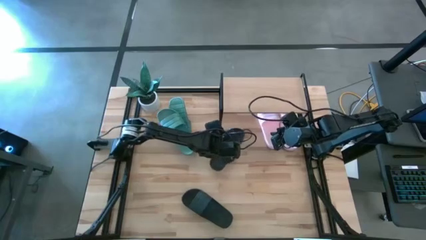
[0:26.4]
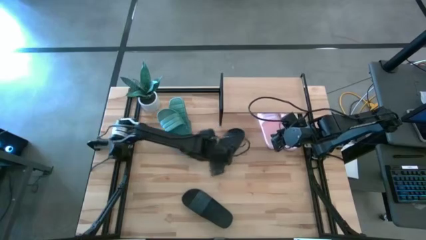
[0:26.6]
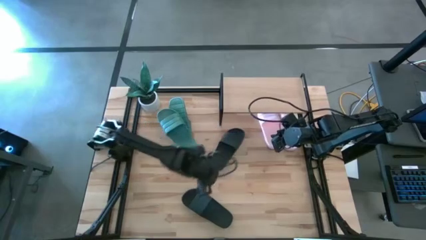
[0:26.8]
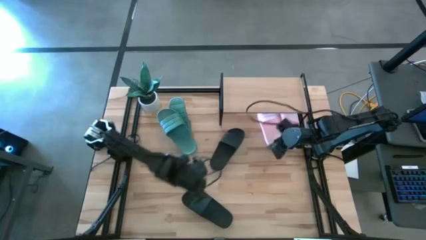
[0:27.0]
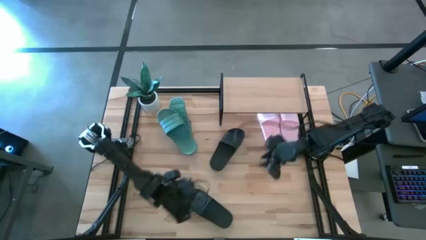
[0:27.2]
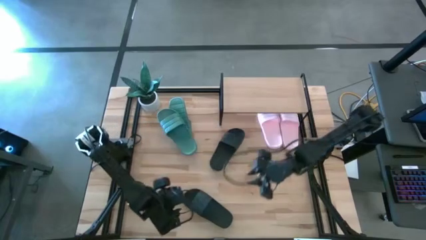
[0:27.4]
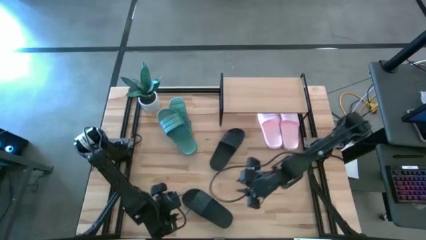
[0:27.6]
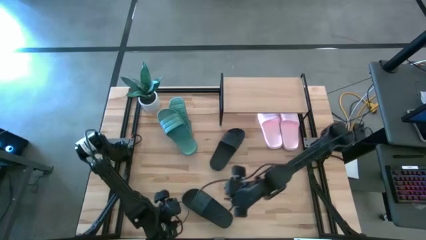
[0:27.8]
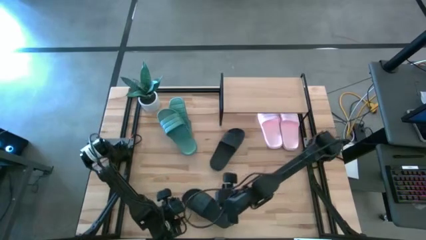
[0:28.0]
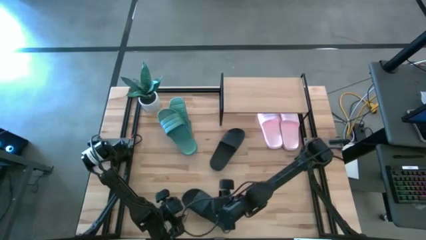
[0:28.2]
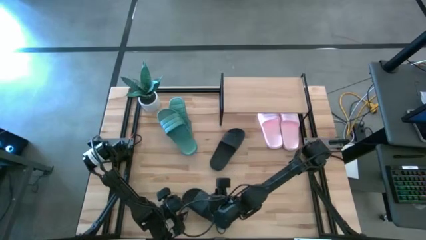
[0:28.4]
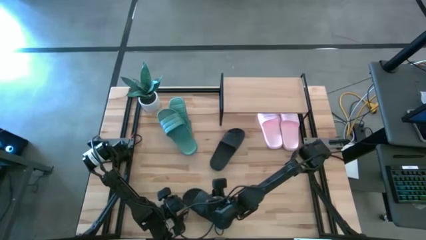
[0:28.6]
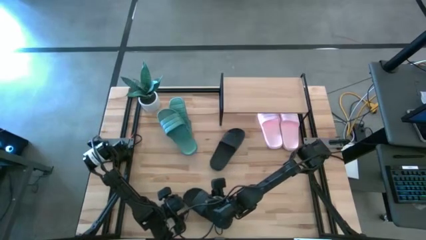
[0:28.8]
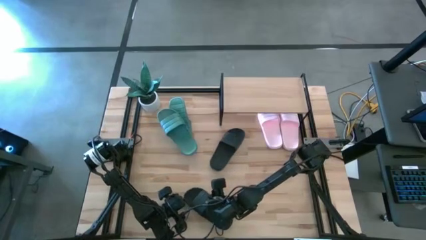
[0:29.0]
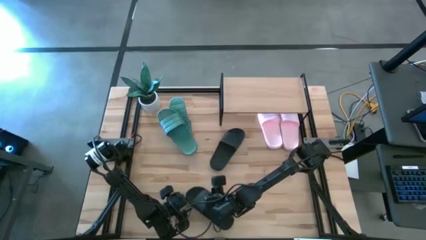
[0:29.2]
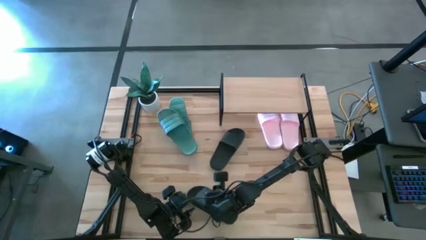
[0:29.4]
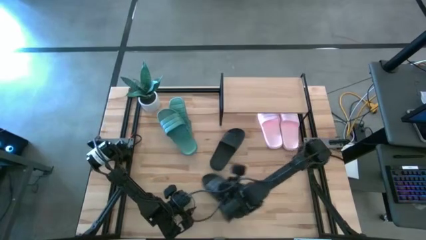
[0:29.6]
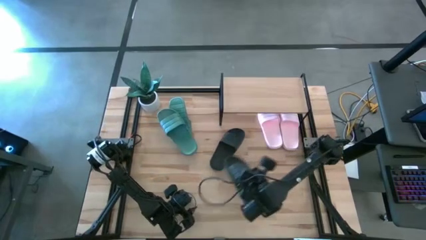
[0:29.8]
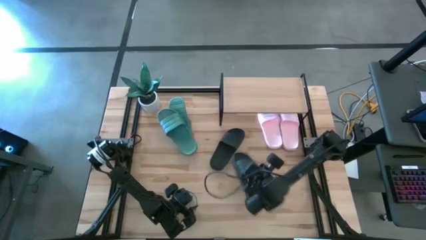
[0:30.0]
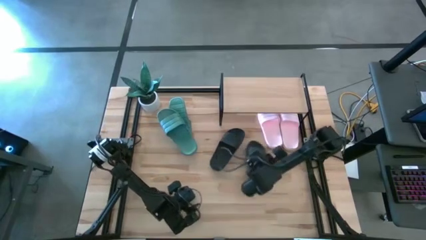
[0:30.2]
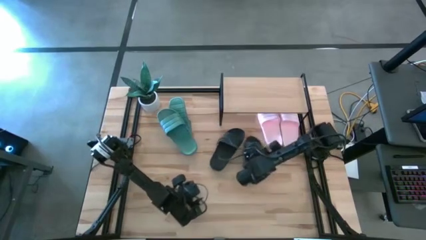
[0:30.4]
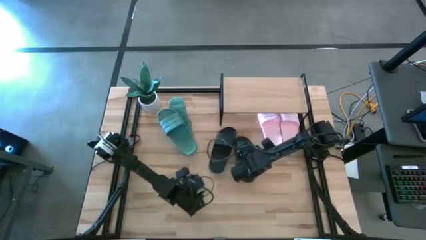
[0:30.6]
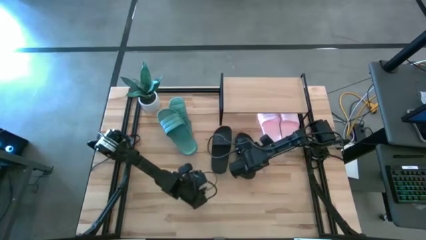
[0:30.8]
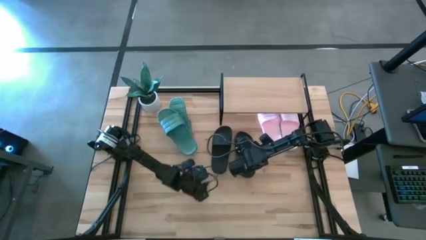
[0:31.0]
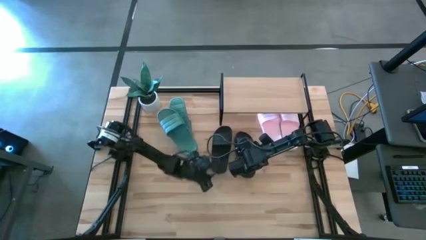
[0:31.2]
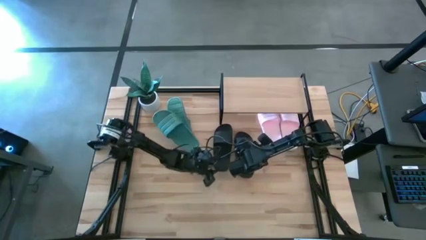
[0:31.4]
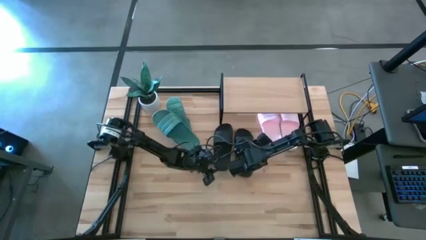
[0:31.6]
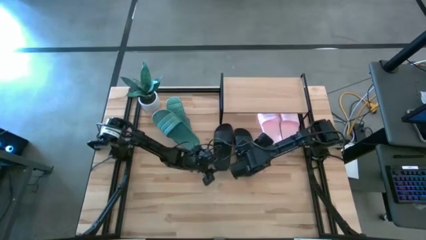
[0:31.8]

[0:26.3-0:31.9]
Task: Pick and place slides into the shelf
Put the black slide under the shelf

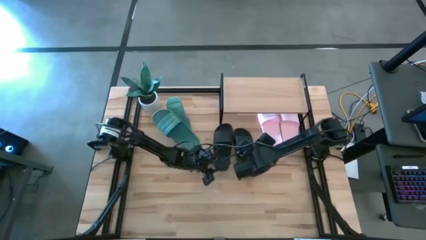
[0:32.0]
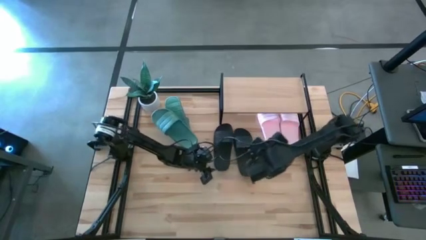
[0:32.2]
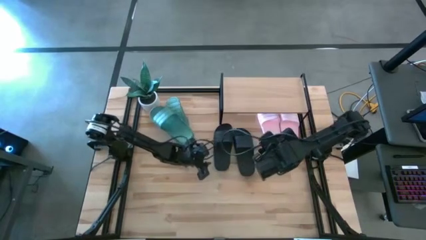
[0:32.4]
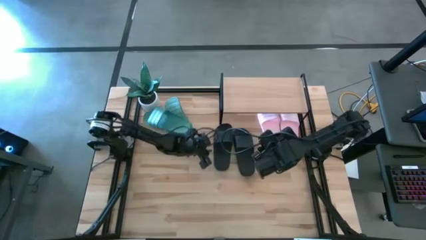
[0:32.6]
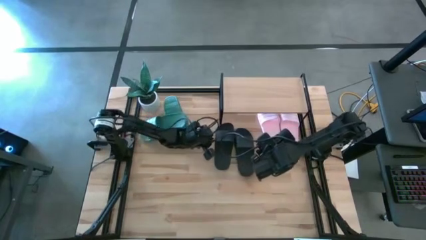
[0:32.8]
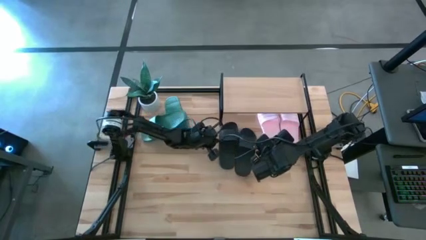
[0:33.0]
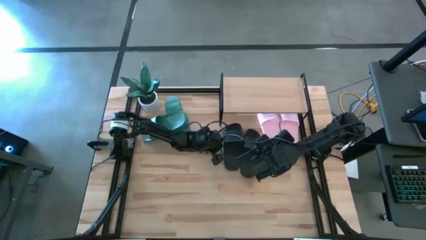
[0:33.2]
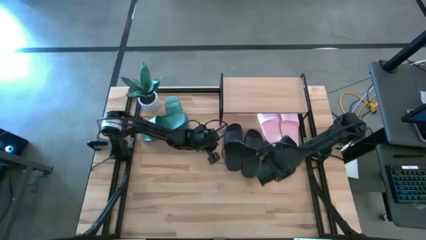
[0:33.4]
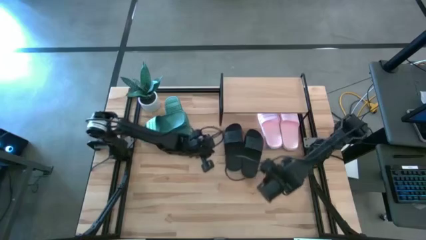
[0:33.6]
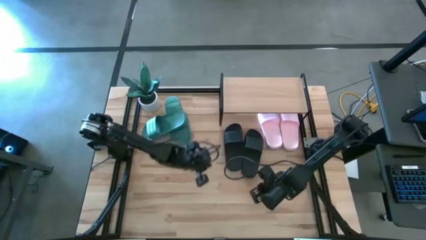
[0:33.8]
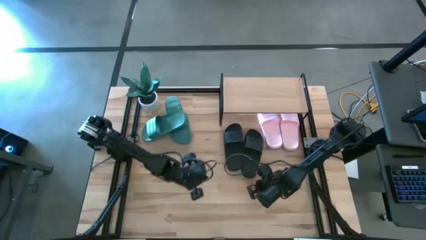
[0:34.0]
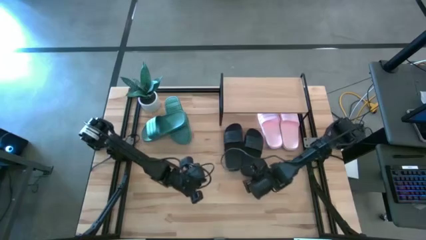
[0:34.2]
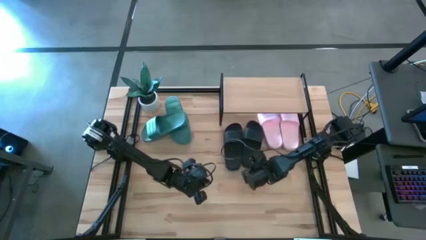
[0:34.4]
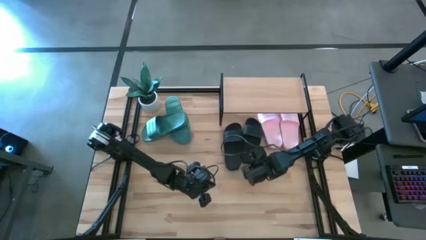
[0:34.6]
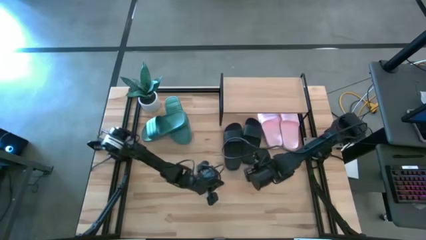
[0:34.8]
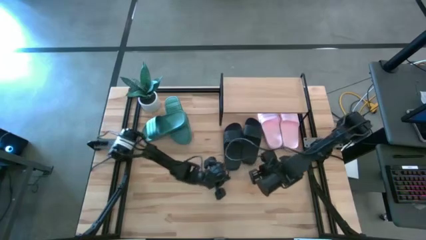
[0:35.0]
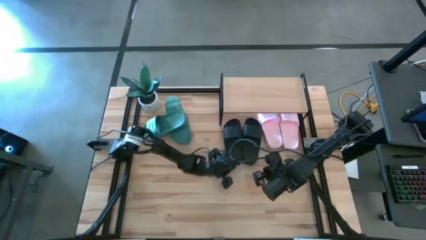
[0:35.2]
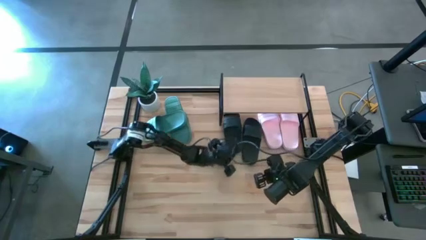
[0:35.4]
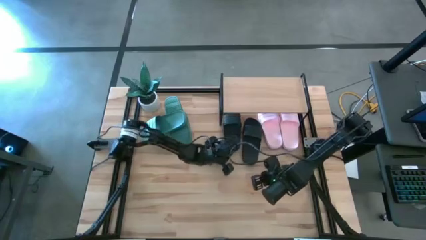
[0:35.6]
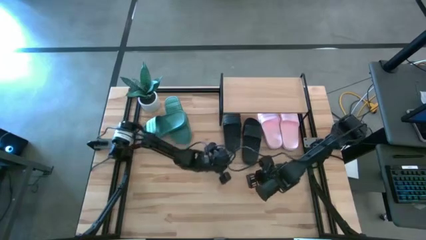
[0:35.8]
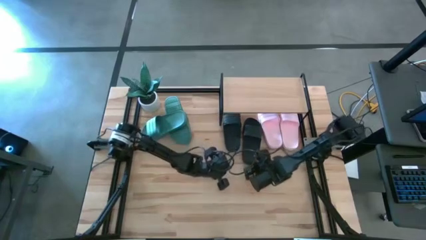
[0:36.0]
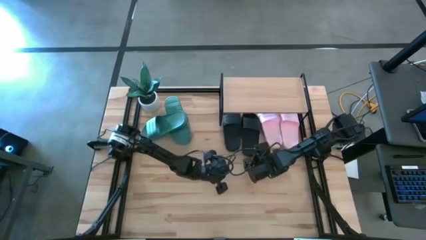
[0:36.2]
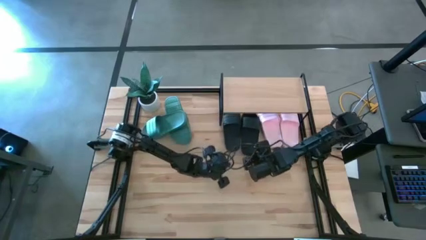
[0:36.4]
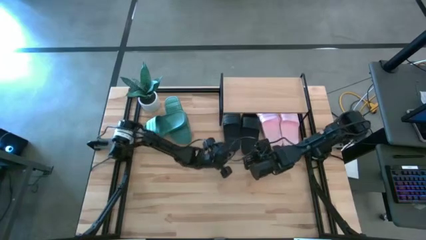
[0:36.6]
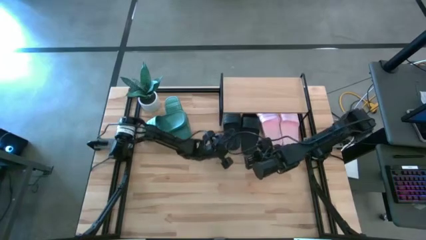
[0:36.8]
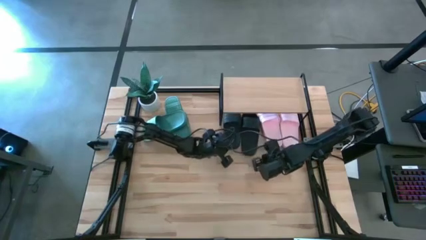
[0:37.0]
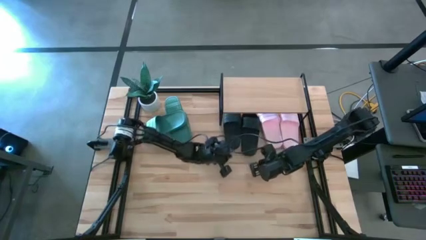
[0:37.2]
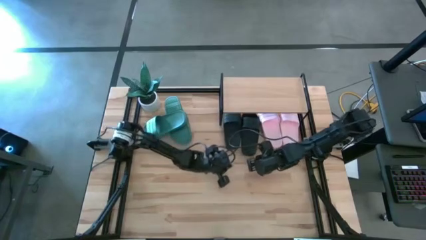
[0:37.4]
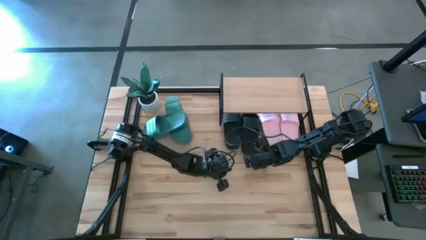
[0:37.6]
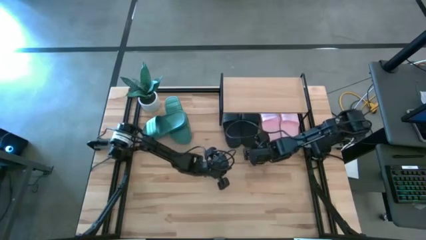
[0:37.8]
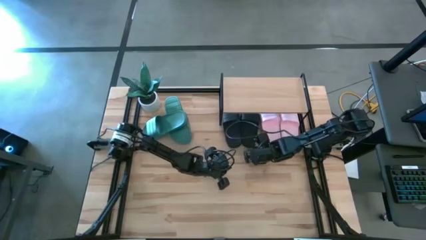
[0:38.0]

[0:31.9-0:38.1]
Adjust the black slides under the shelf

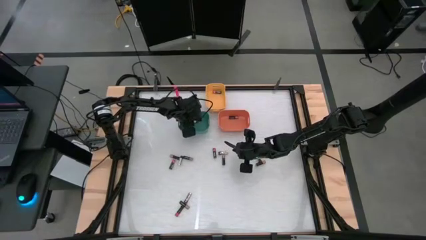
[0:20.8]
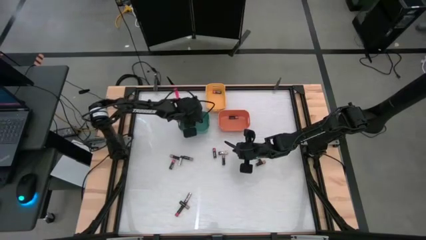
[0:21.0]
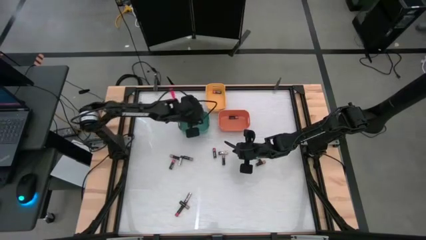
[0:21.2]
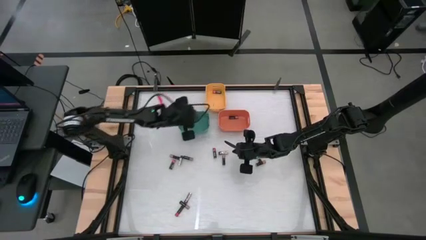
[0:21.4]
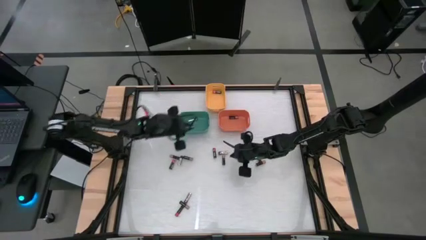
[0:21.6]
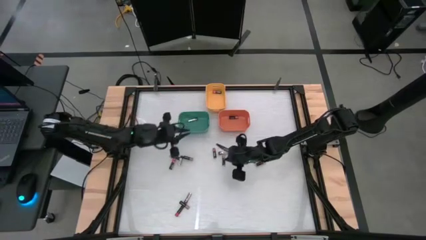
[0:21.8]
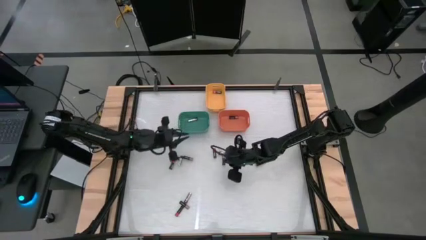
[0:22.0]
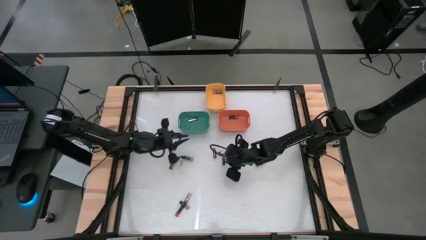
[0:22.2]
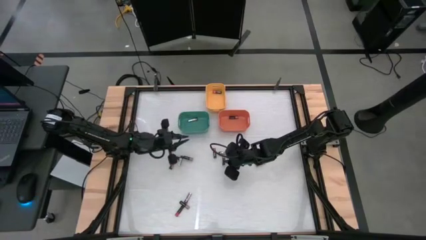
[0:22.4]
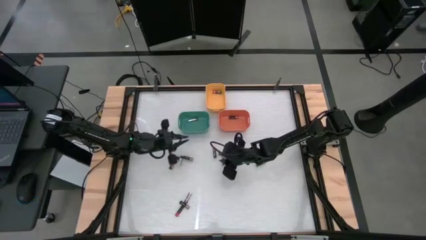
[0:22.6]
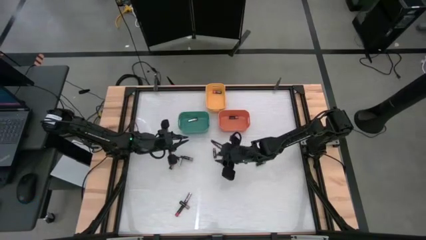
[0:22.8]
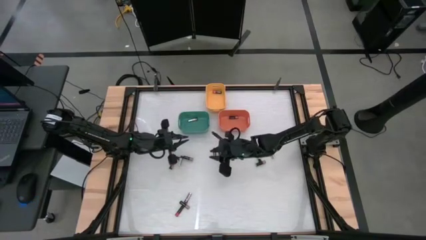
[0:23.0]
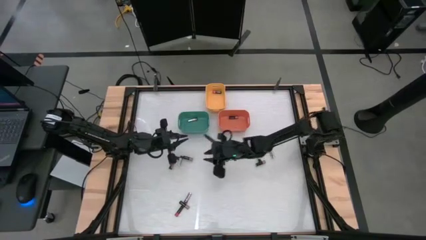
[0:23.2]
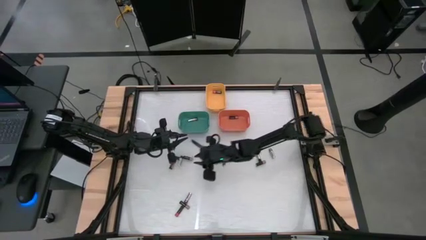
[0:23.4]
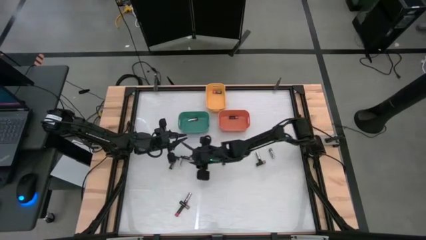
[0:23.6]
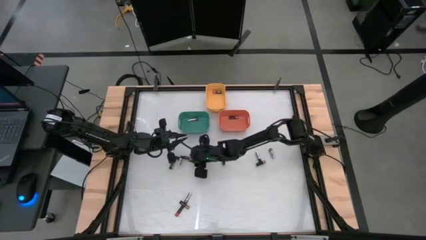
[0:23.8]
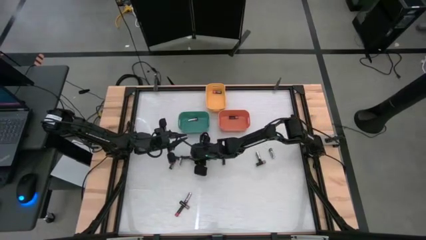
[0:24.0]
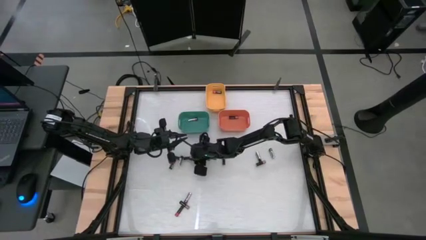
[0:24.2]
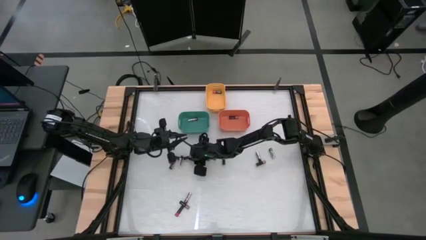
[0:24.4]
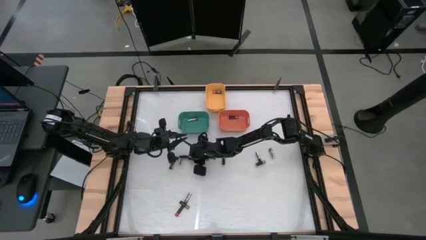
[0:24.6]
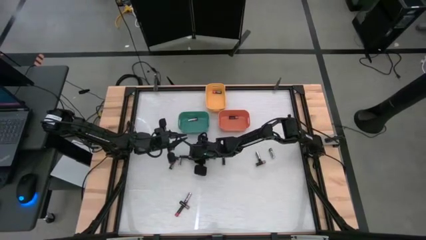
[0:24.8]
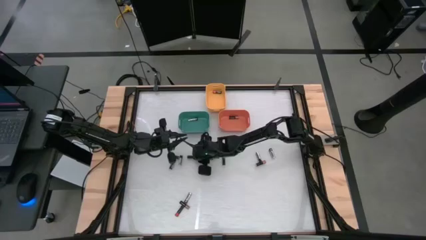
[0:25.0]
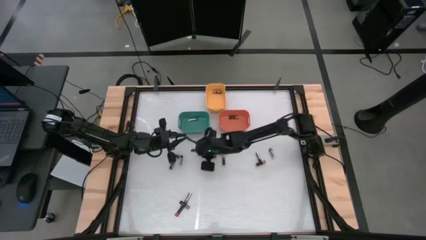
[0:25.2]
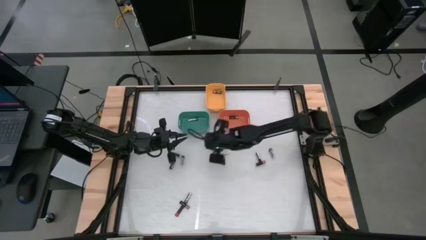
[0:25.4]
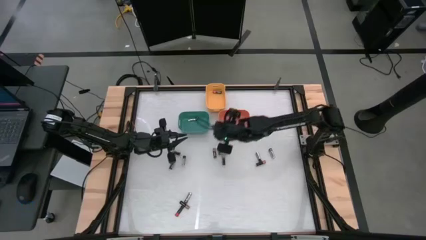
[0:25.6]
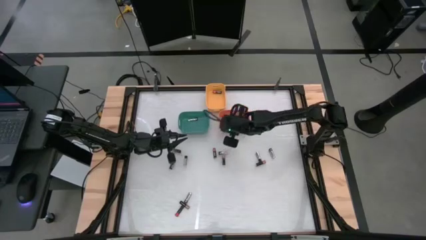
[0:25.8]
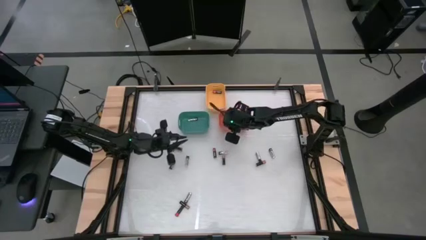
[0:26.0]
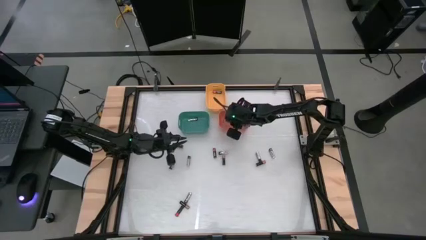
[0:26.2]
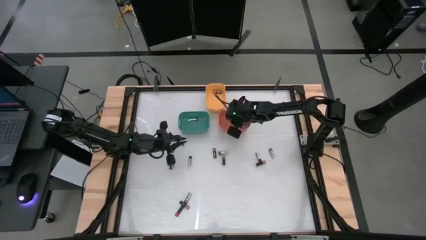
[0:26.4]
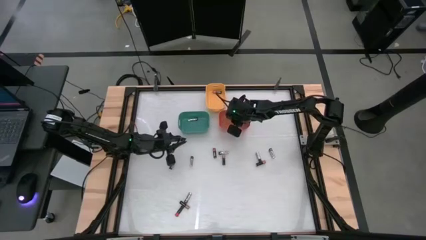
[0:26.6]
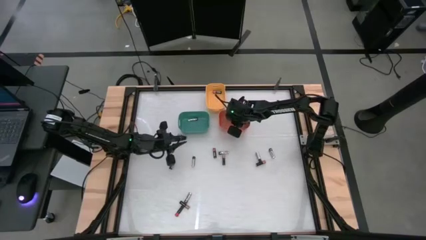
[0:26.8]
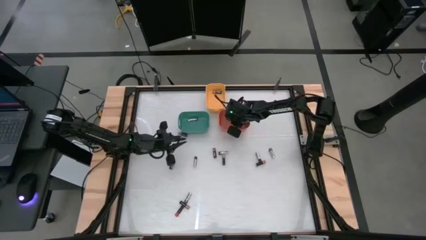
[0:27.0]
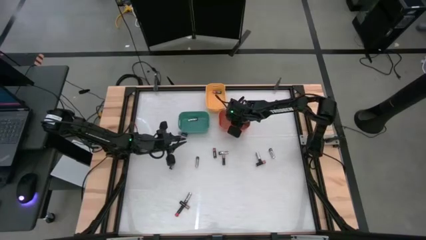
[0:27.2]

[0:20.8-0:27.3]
Task: Sort batteries
Put the brown battery into the orange bin
